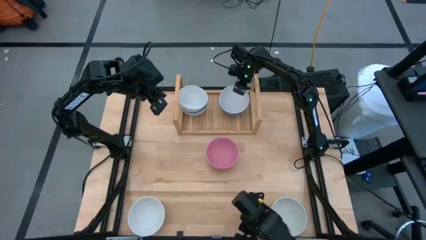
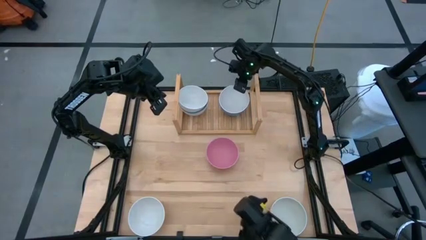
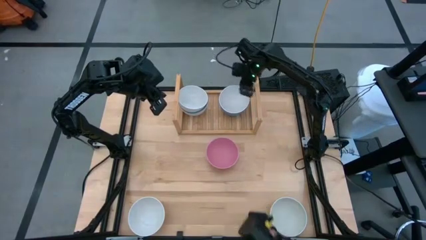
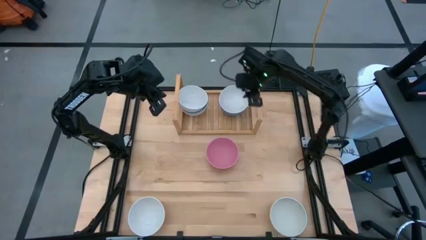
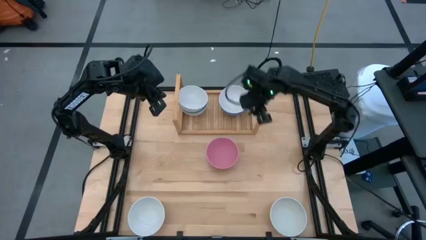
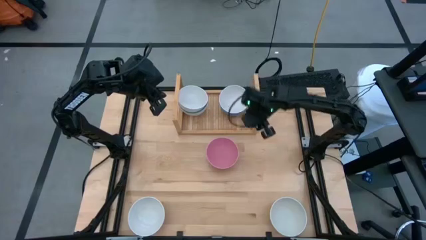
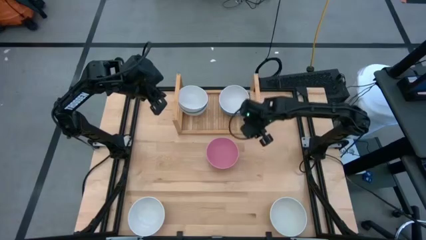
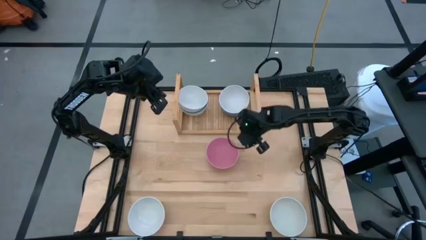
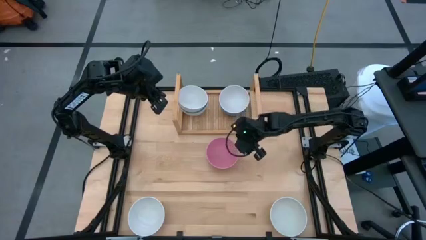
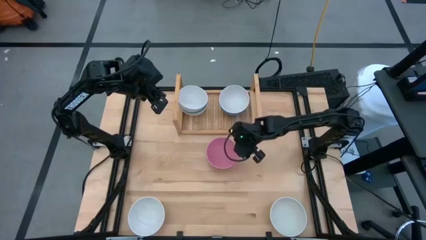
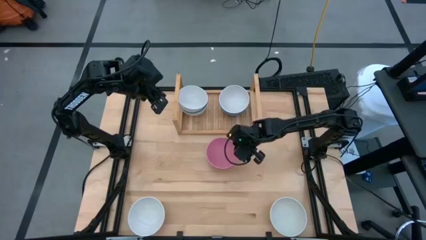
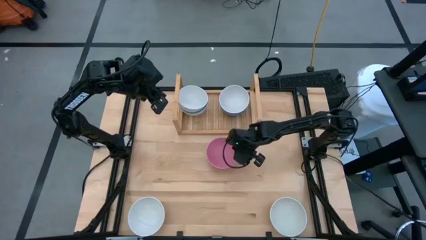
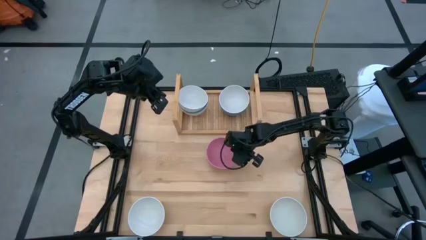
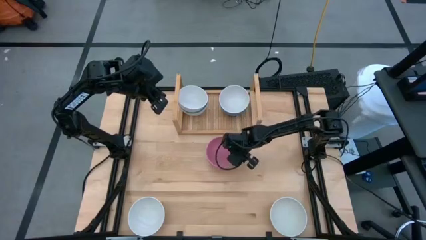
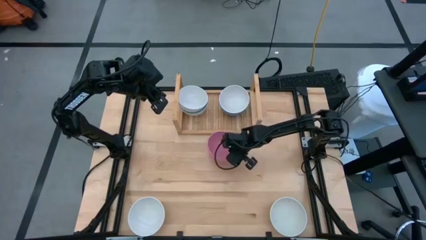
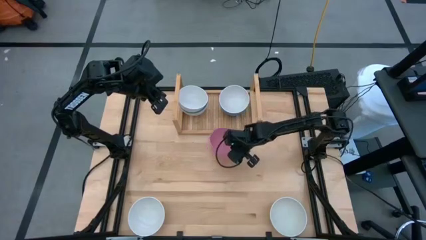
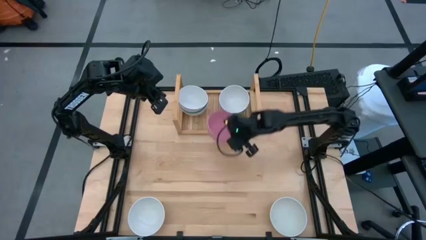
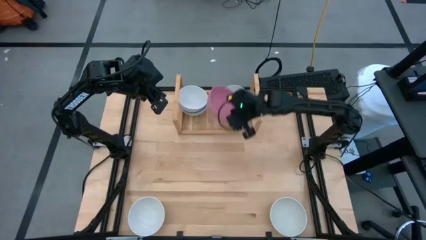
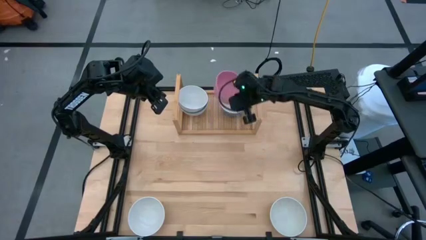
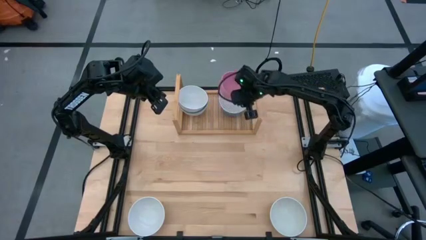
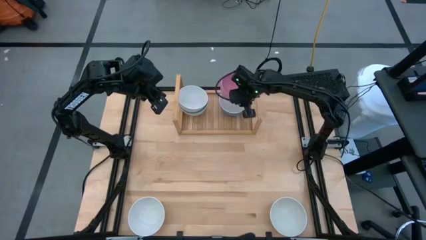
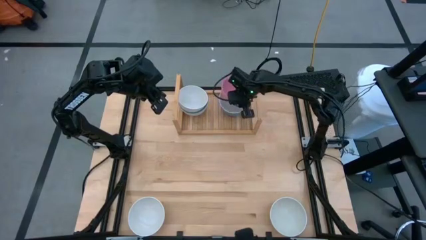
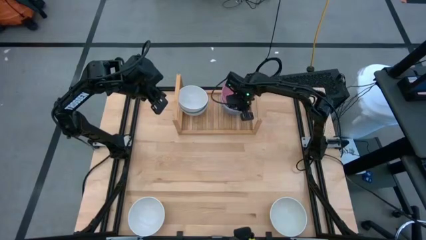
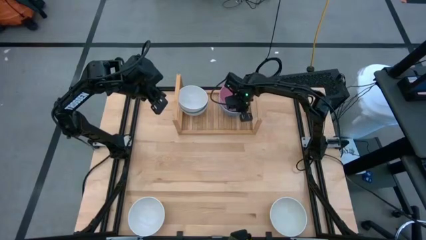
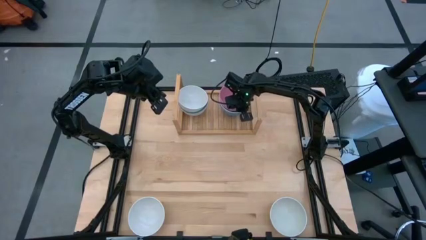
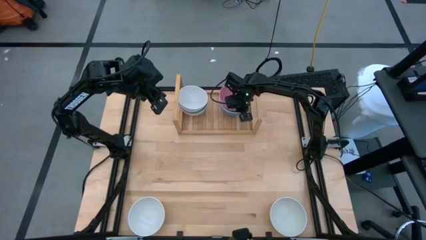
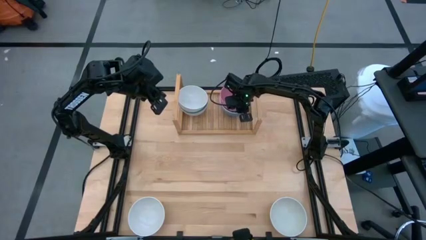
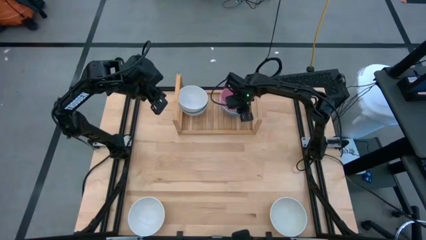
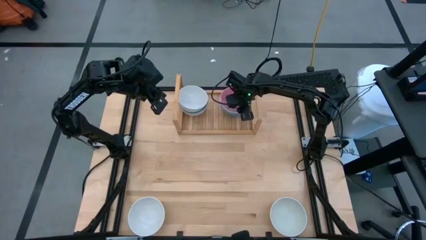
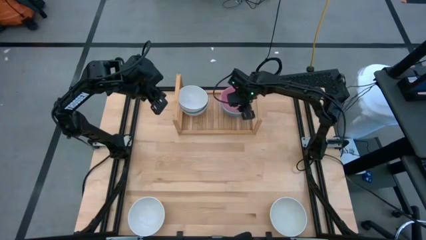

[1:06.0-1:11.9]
Task: Place and stack bowls onto a shelf
Stack the pink bowl on top of the white bowl on the shelf

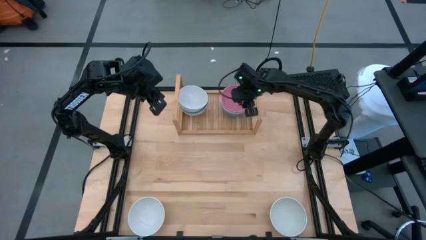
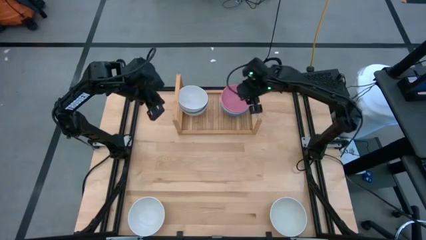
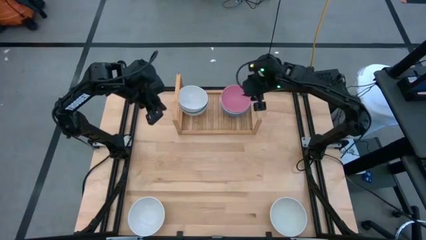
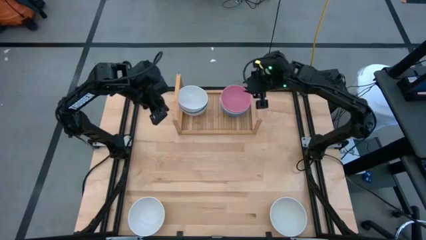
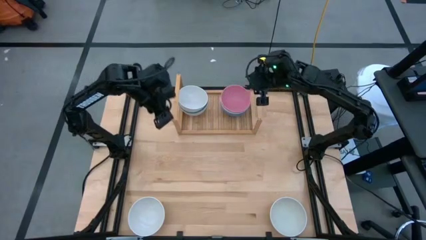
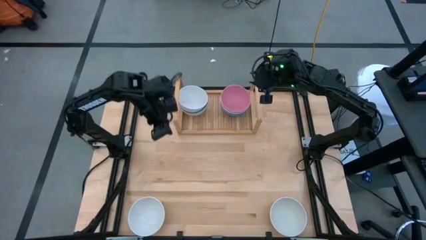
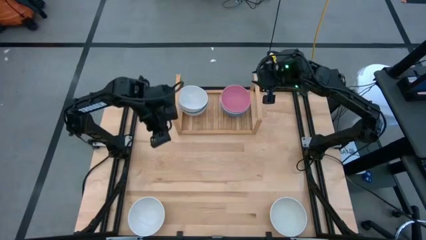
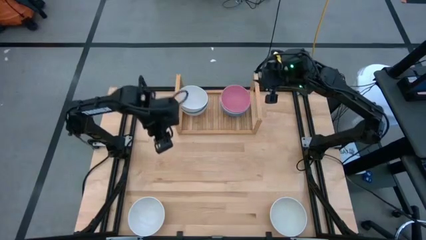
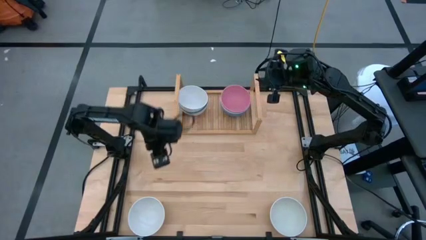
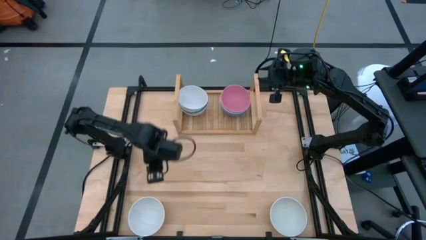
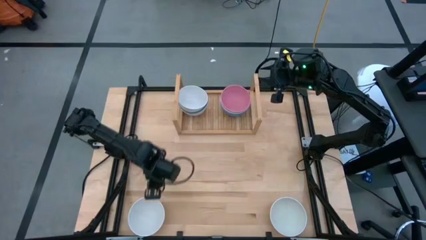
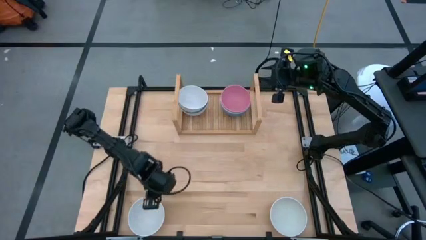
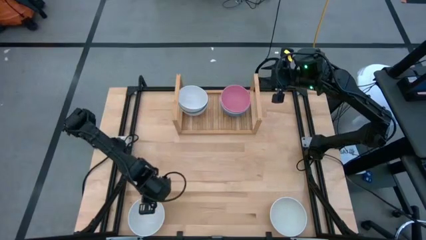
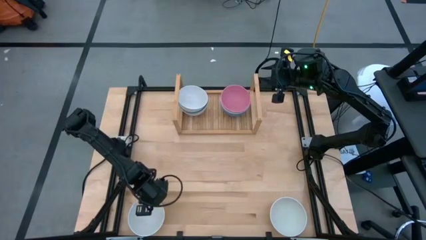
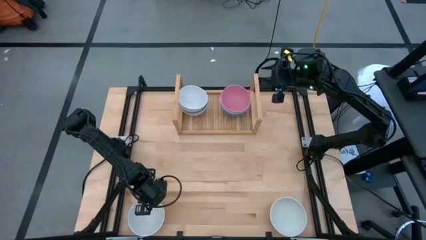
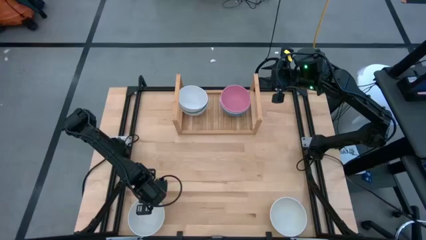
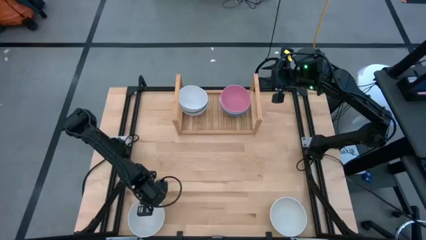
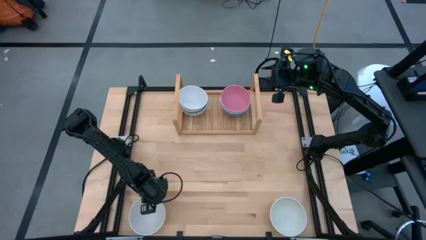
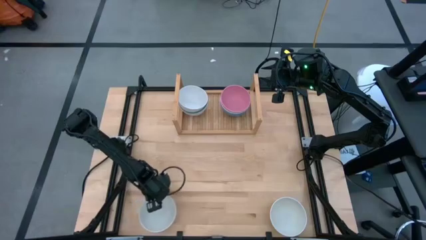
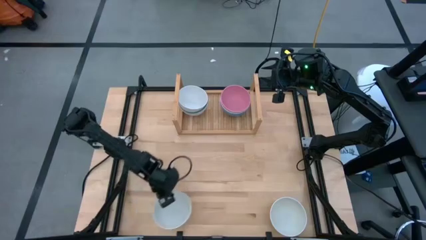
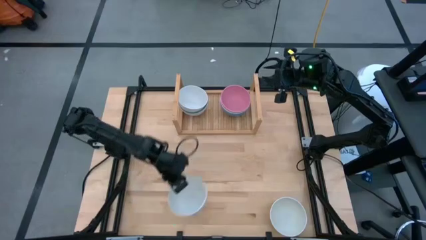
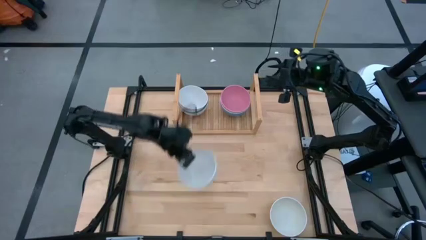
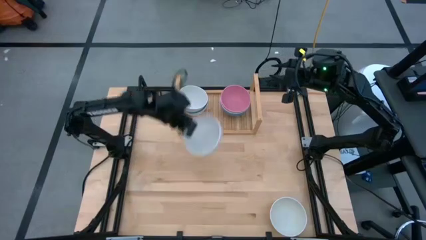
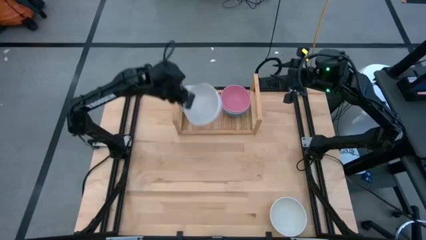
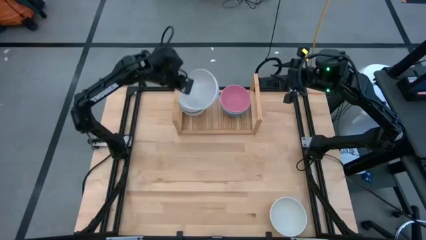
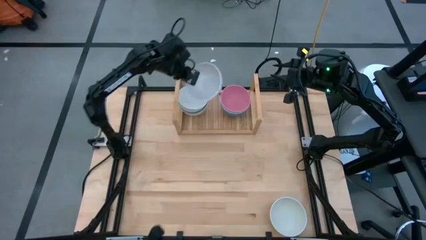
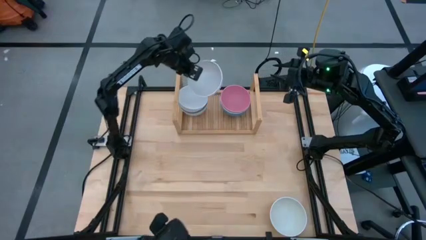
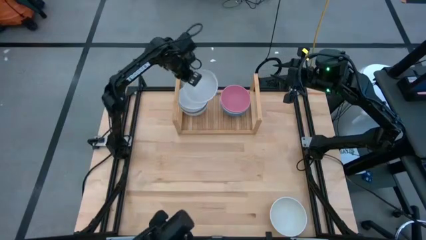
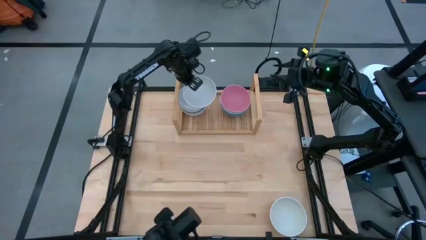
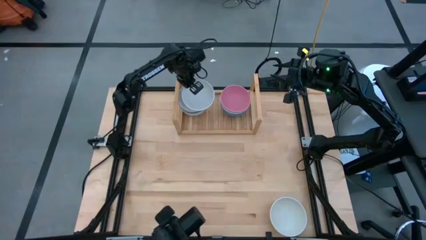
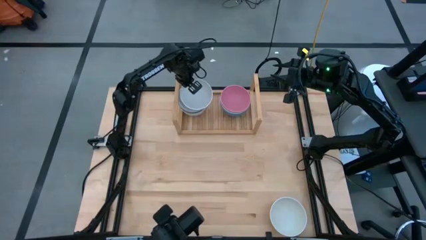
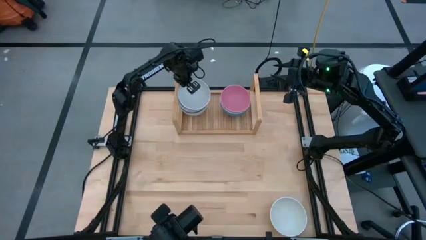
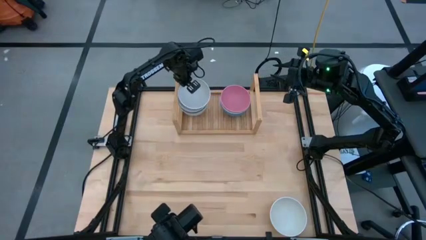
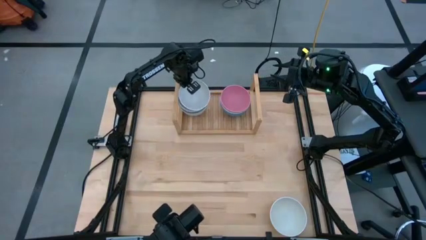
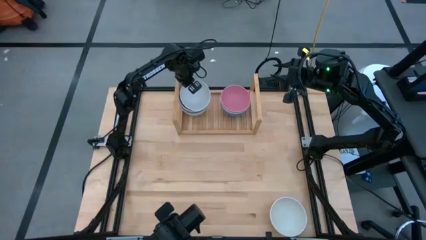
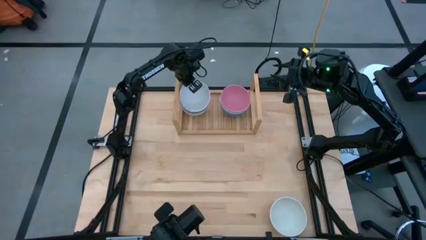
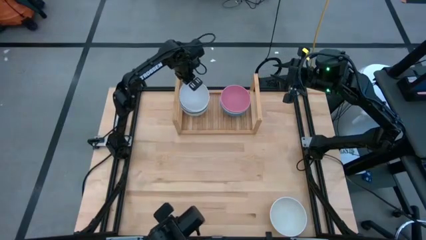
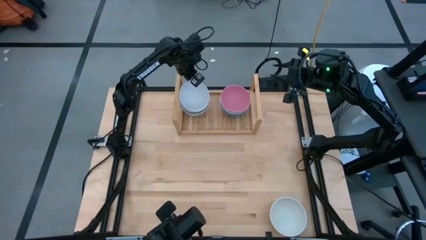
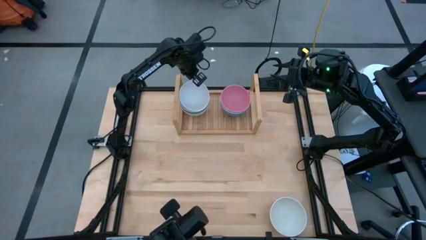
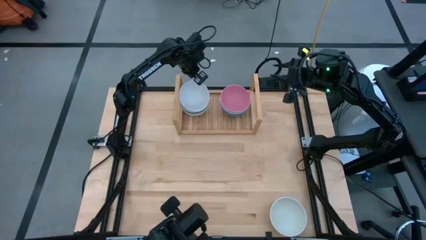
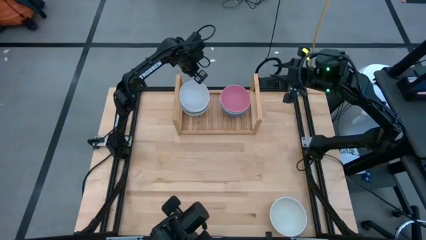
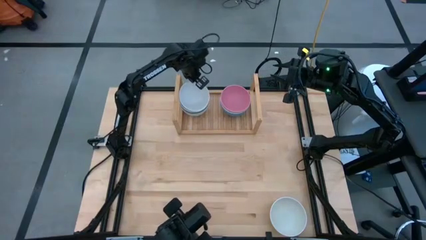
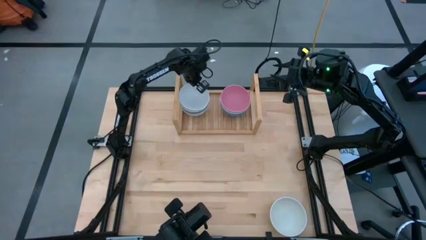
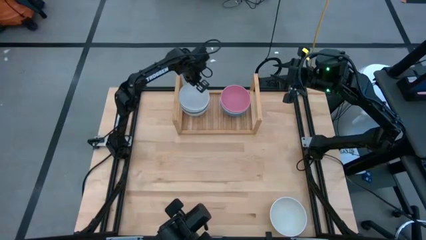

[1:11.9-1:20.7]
Stack the white bowl on top of the white bowl on the shelf
